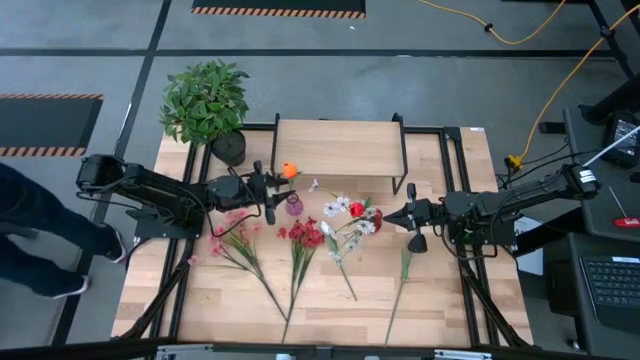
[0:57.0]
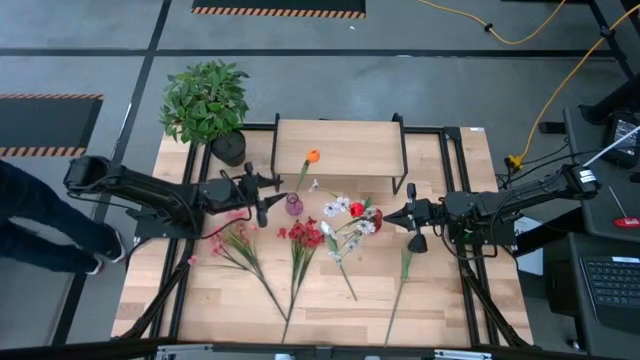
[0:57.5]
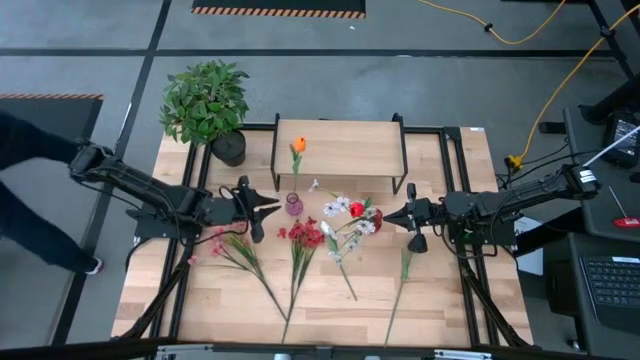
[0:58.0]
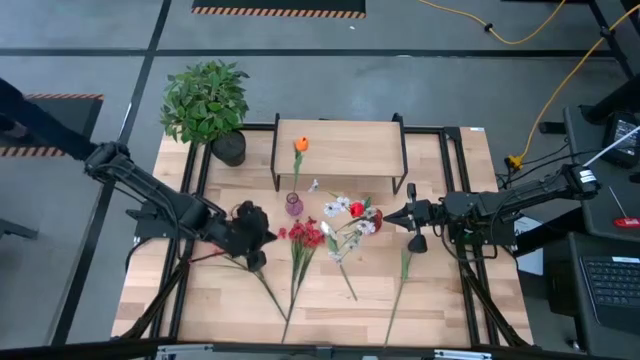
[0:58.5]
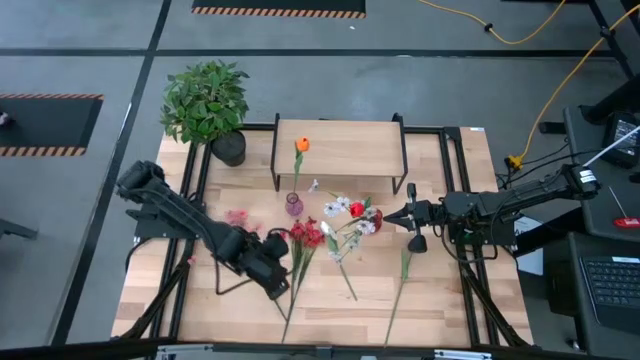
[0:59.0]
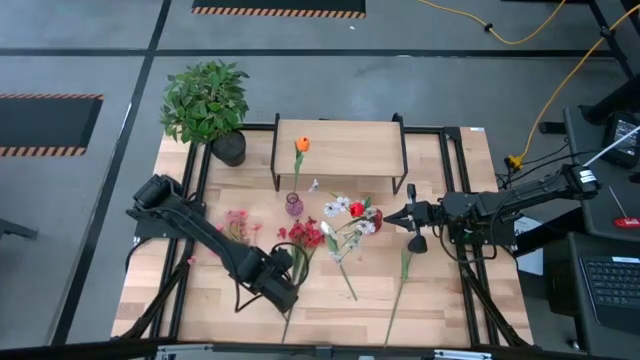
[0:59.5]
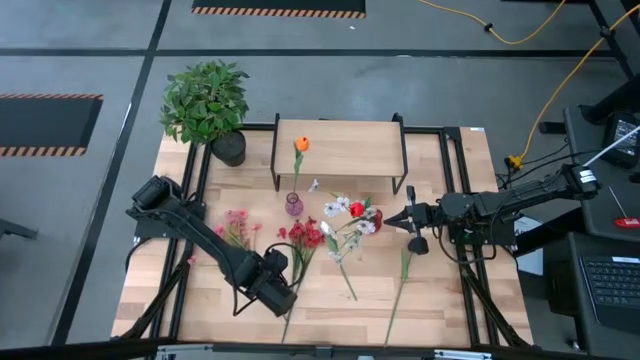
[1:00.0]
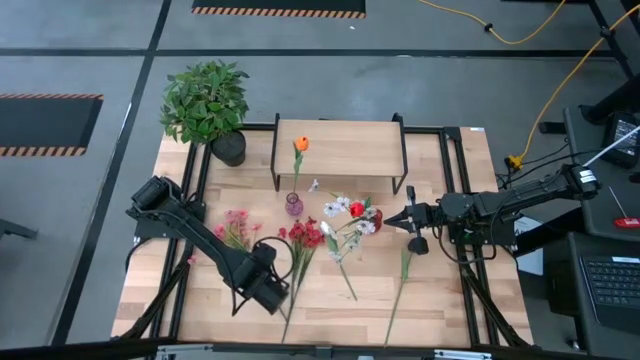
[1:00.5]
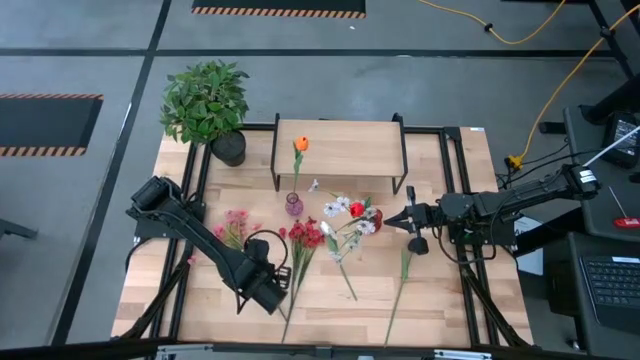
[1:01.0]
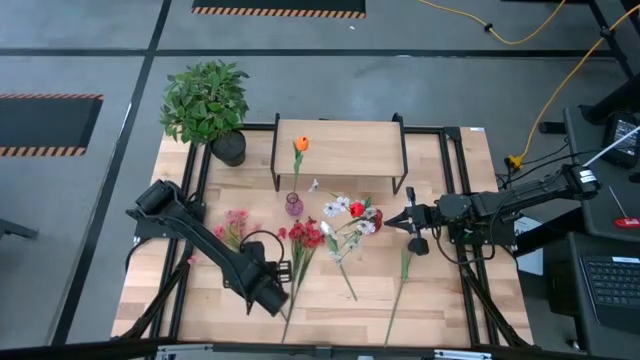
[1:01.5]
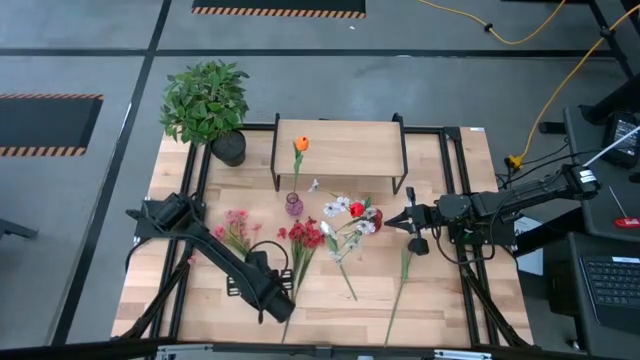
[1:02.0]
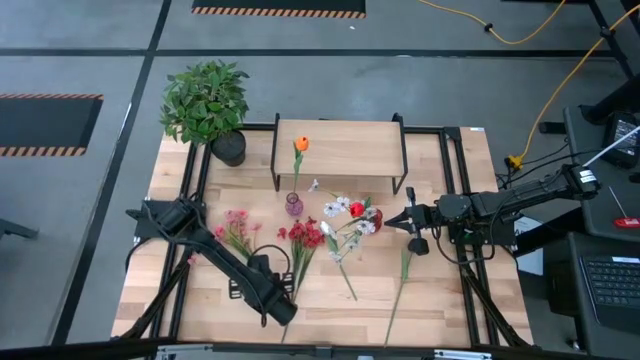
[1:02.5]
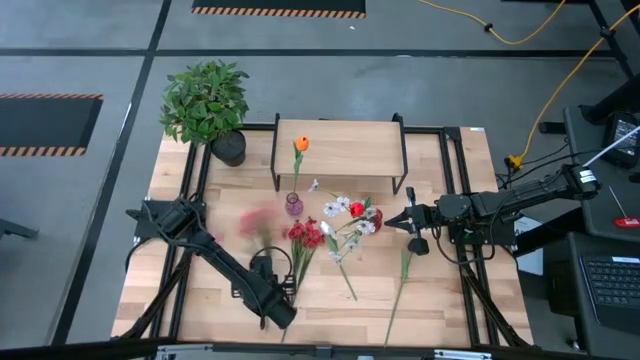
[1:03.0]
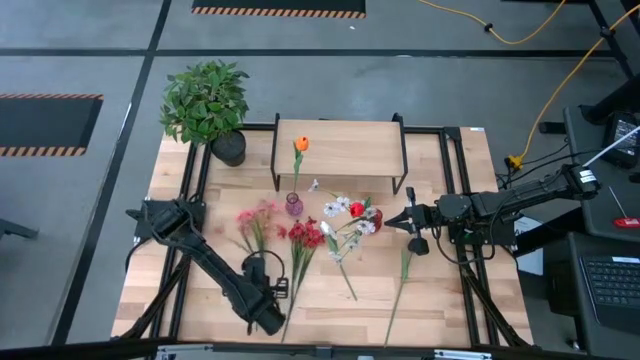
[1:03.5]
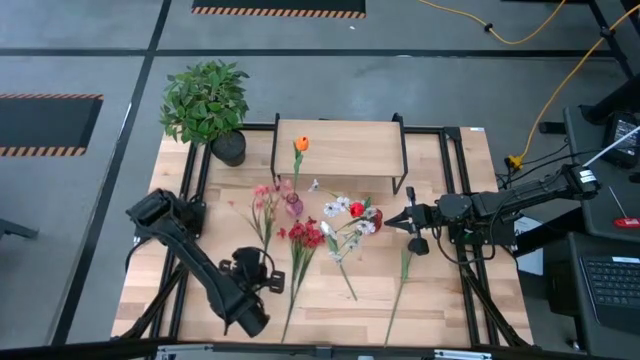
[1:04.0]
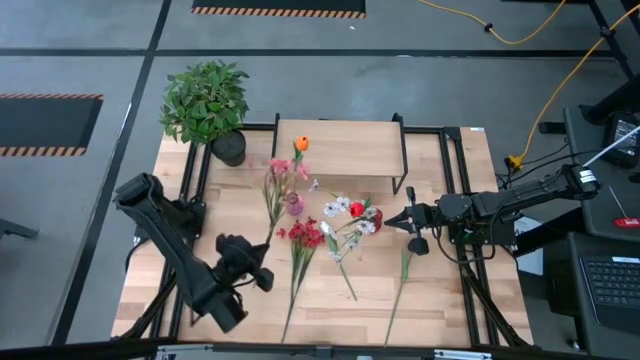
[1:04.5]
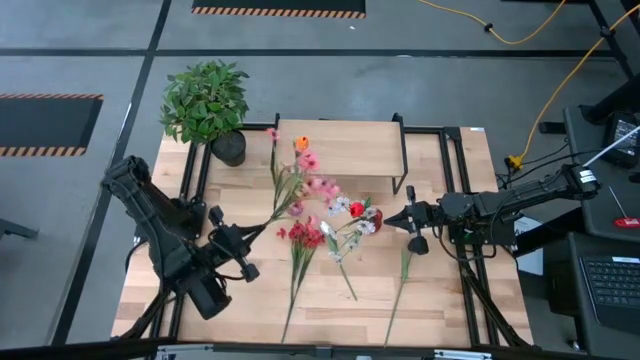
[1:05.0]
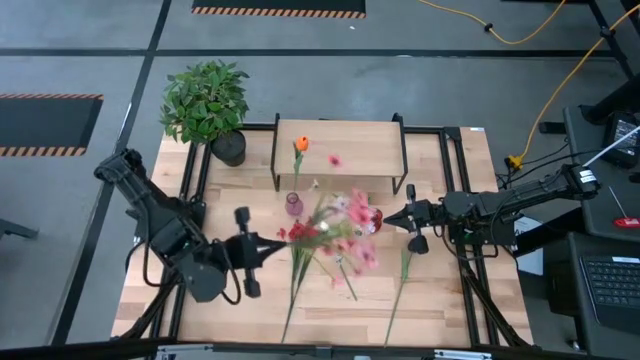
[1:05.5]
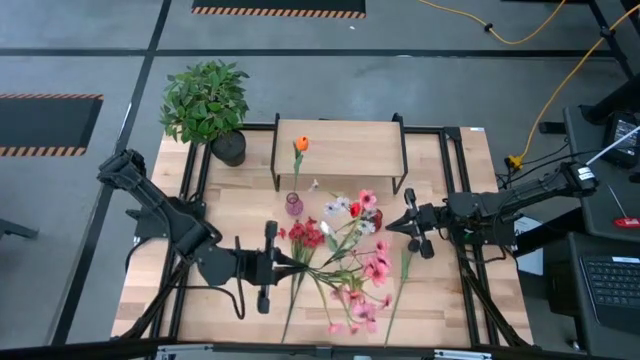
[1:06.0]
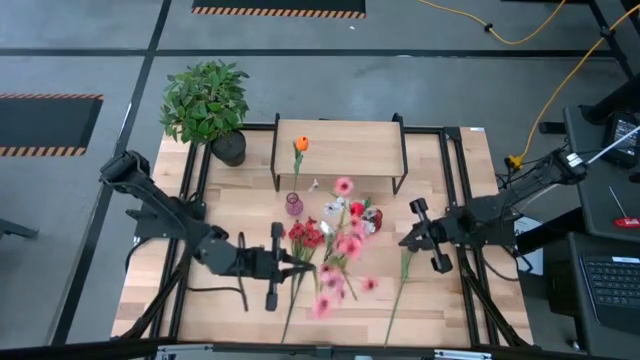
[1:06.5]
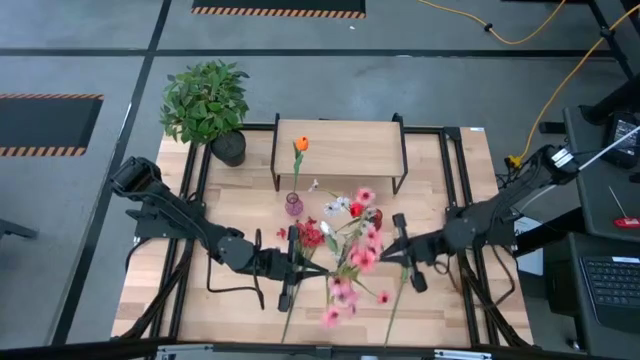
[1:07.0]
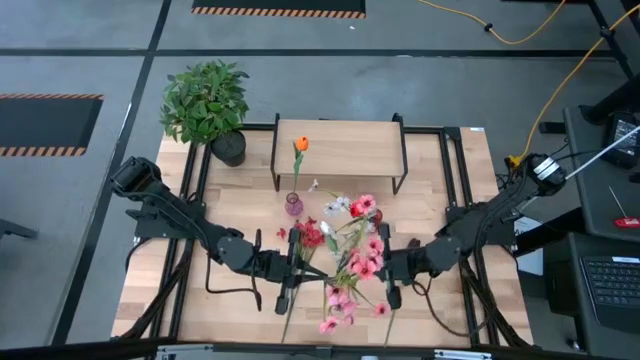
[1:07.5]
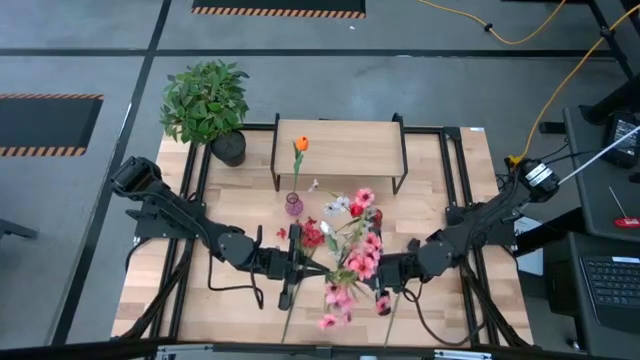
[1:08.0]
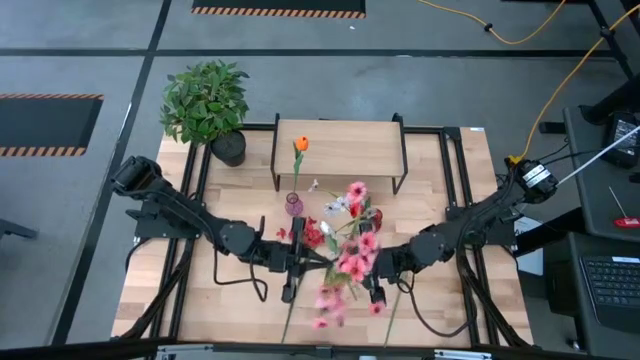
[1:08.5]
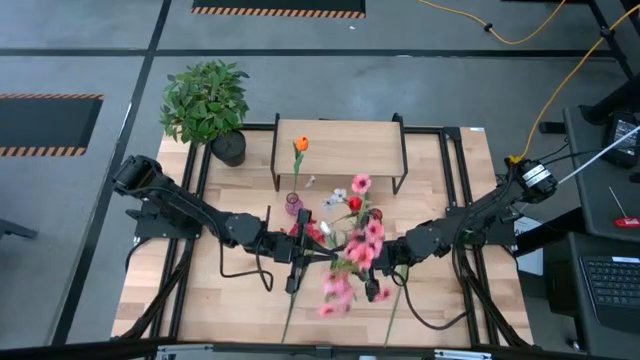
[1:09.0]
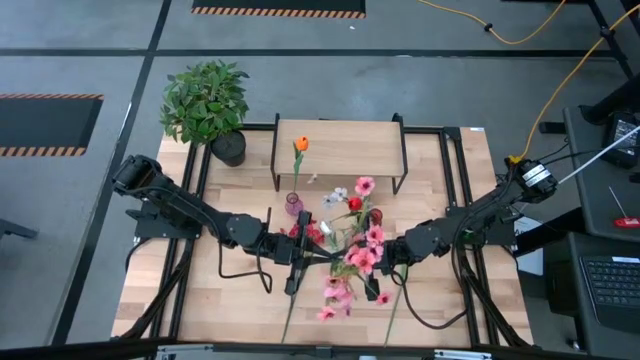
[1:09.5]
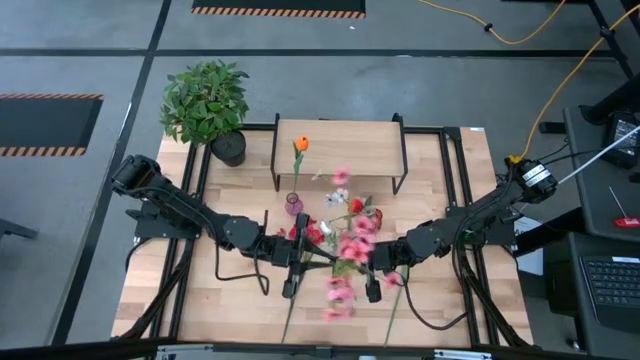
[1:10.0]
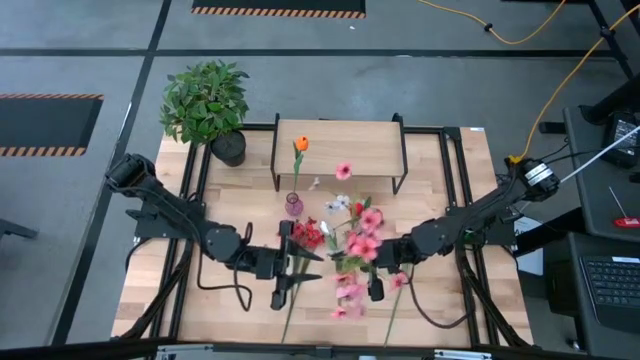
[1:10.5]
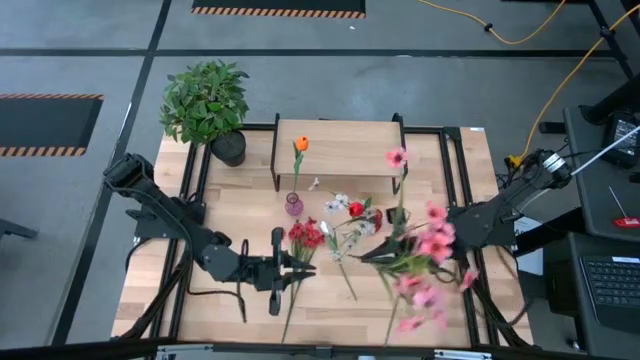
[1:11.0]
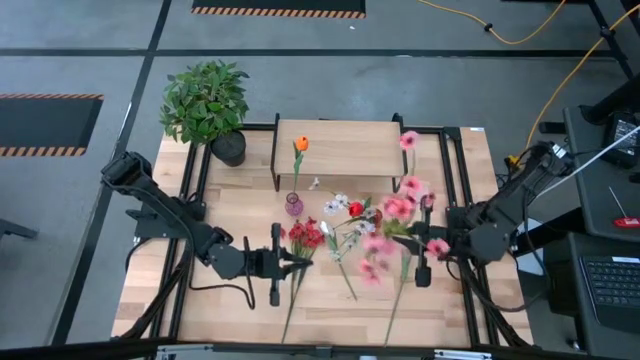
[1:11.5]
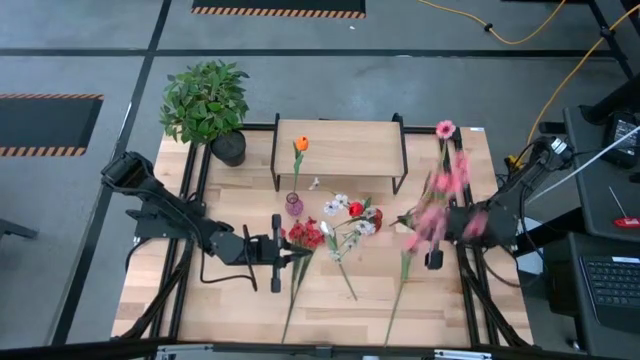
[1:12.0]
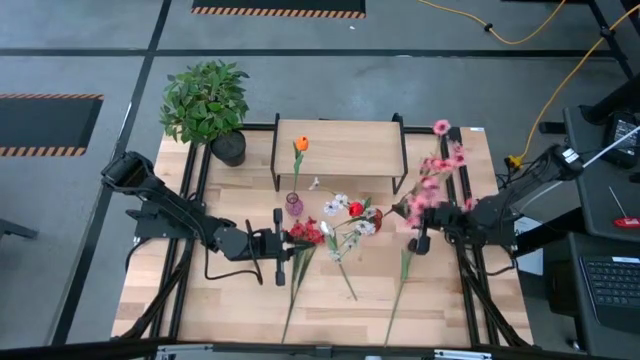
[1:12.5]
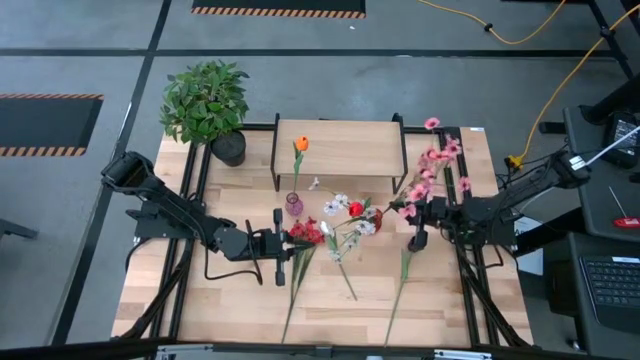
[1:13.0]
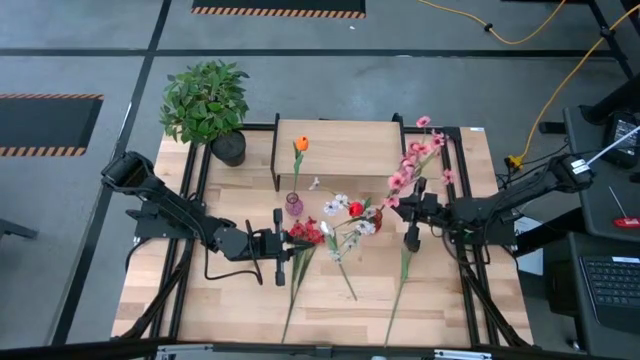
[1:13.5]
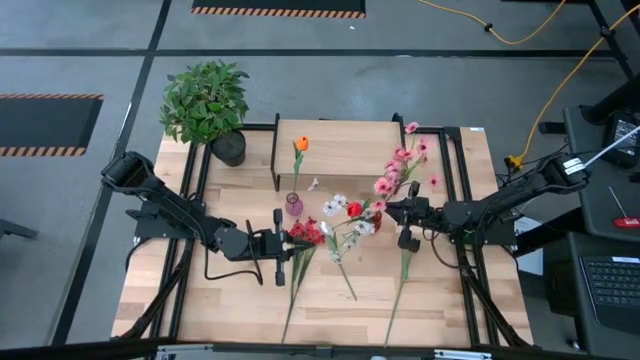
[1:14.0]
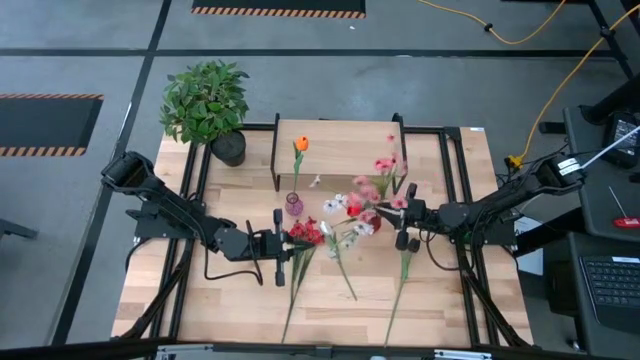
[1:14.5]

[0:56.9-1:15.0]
Task: Pick and place flowers into a vace then onto a shelf
Put the pink flowers into the red vase
